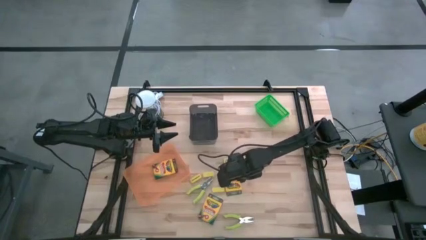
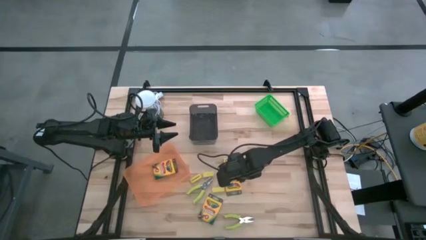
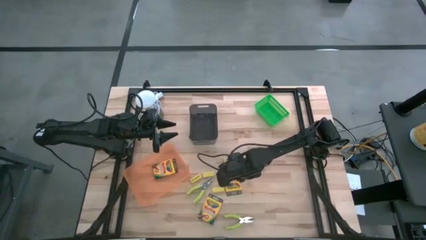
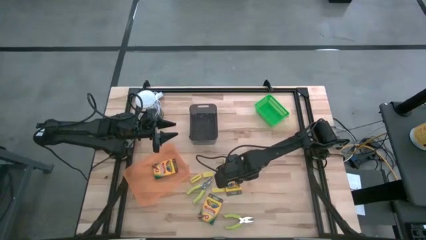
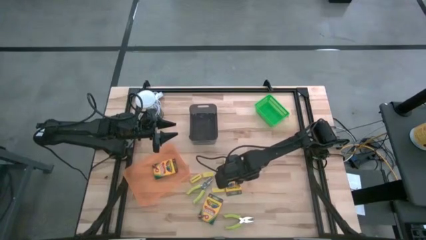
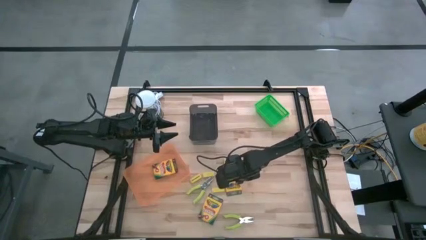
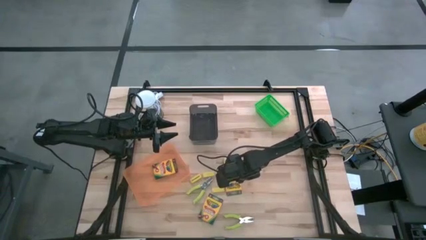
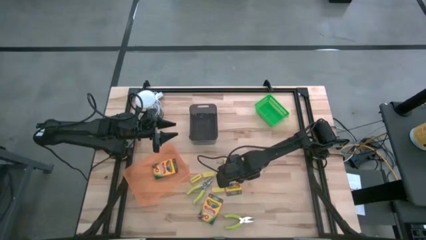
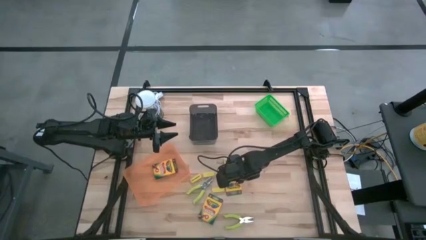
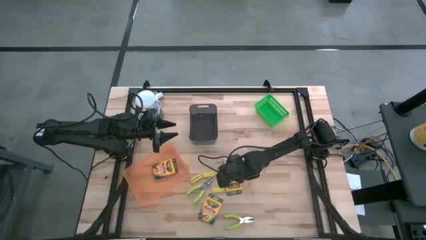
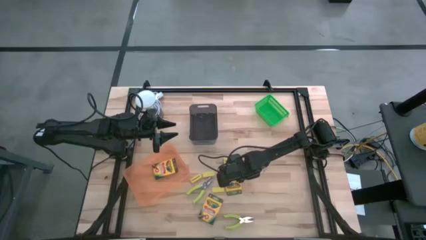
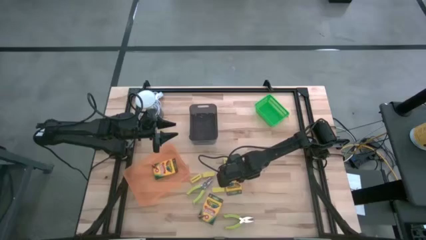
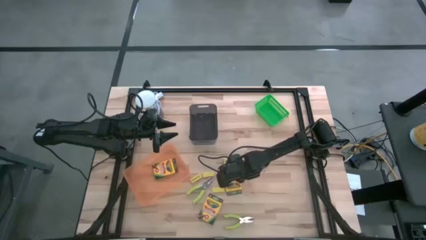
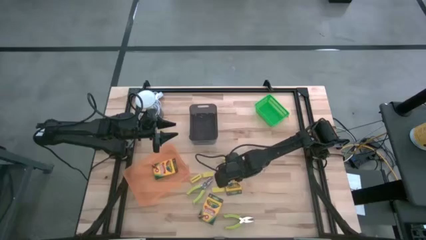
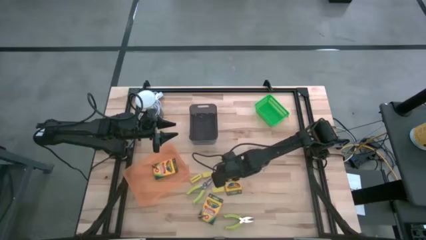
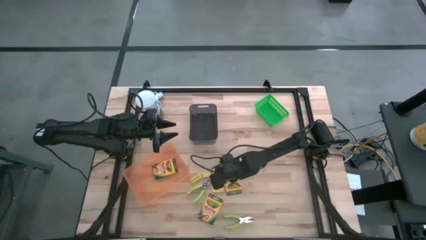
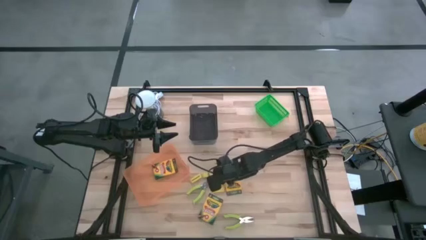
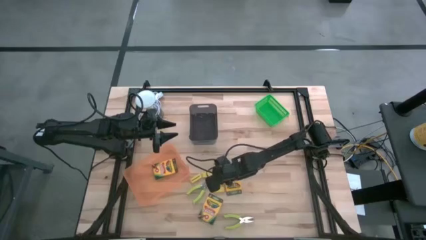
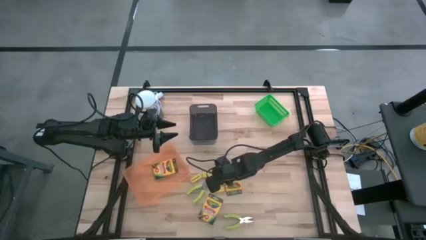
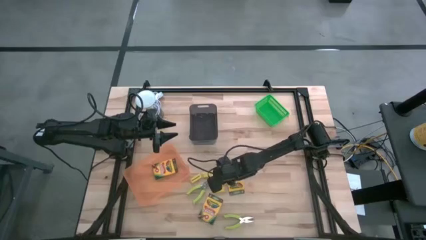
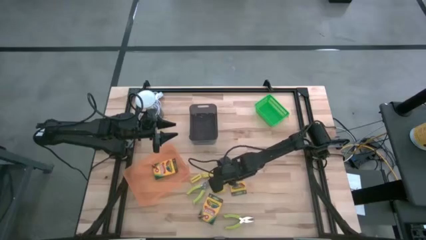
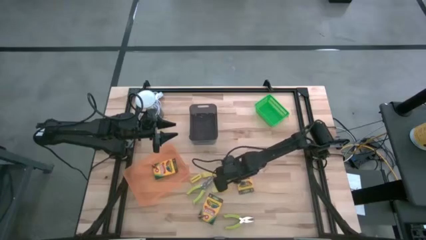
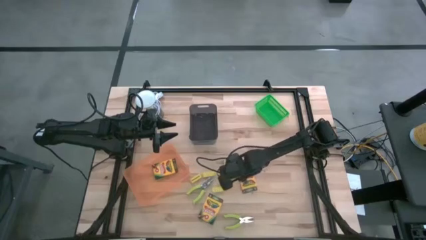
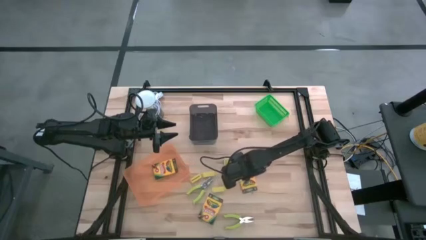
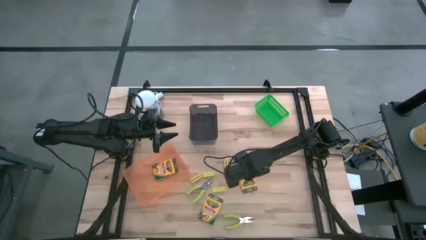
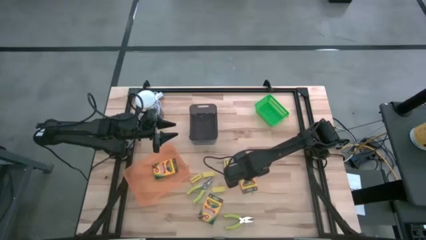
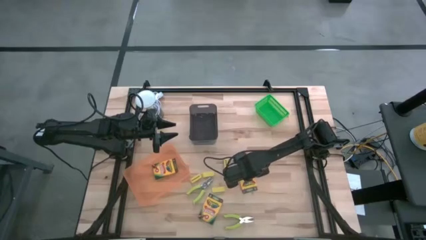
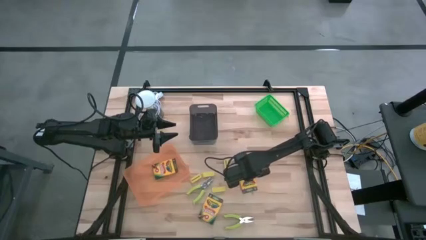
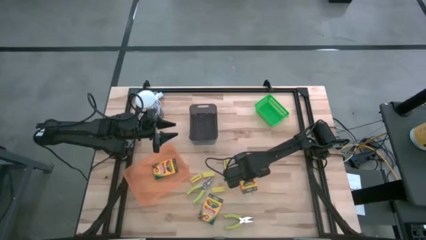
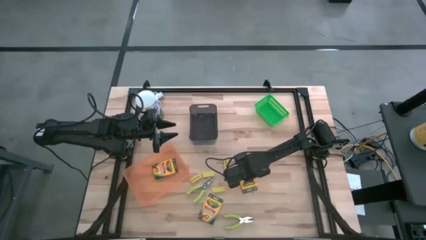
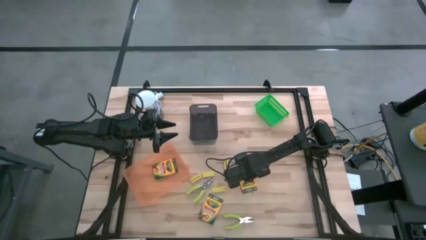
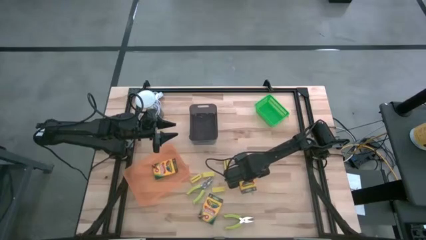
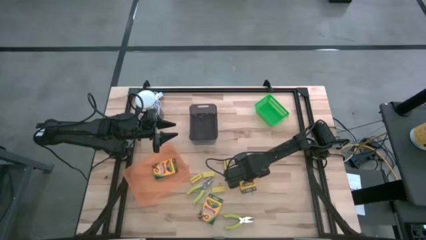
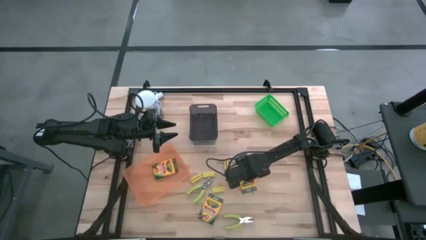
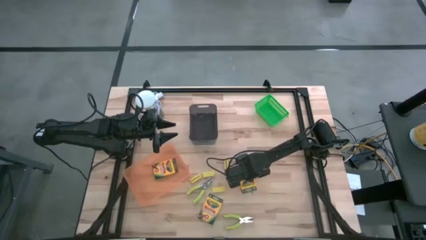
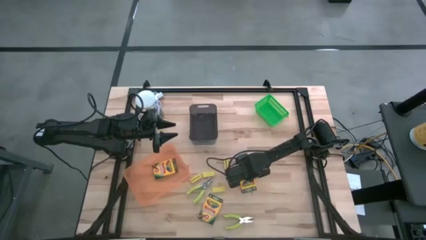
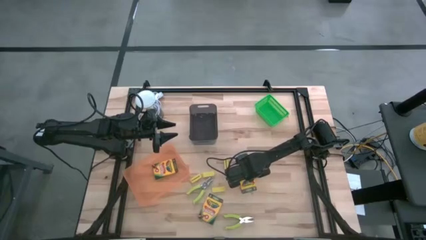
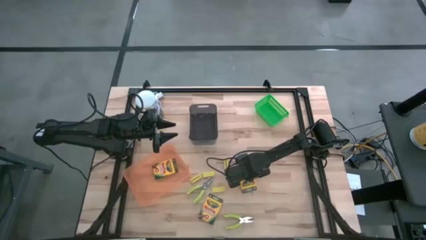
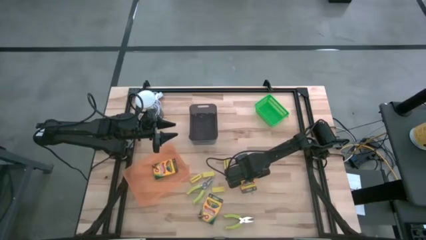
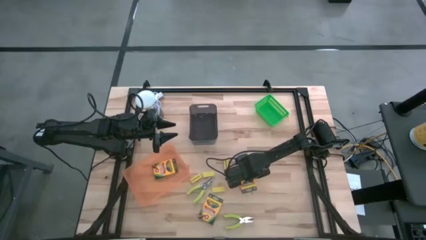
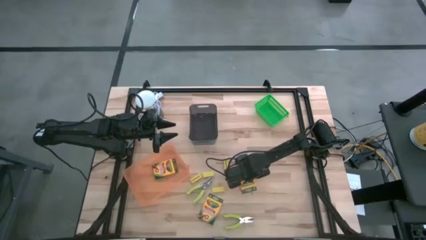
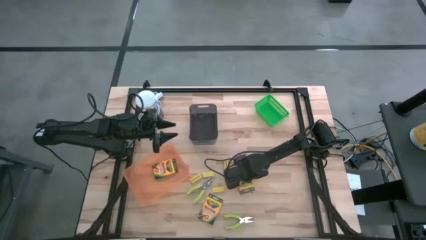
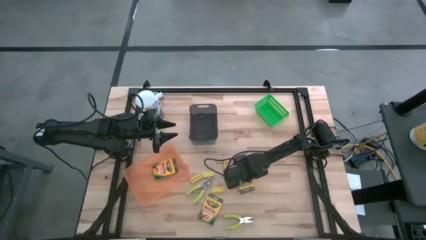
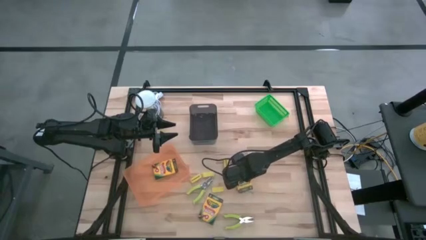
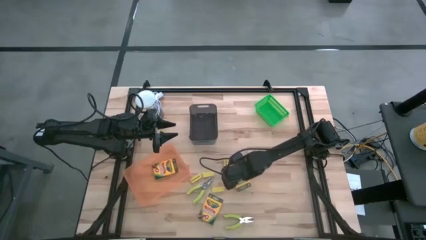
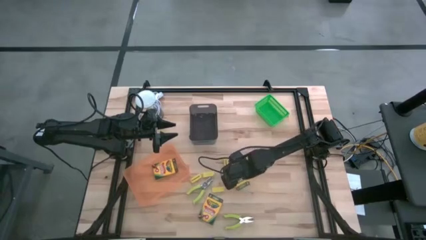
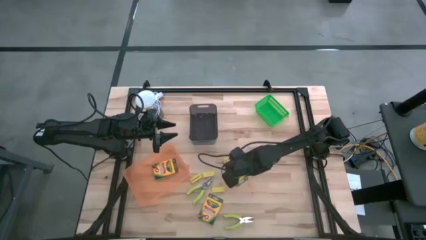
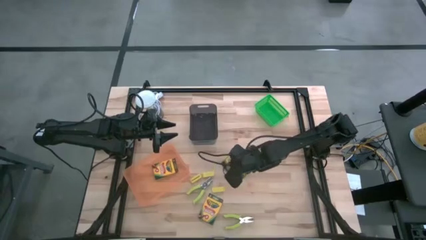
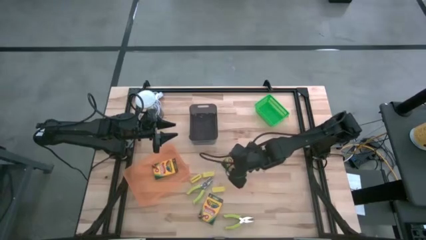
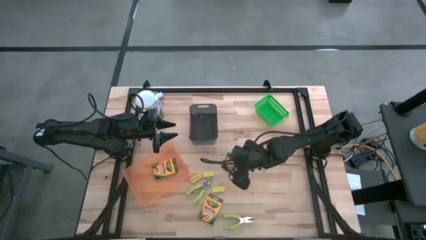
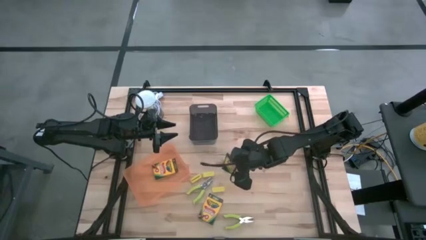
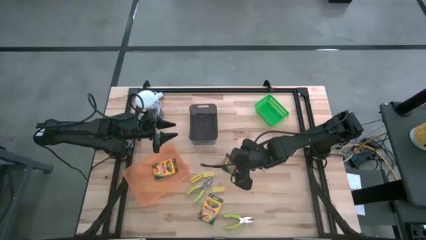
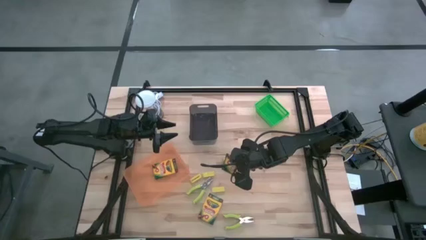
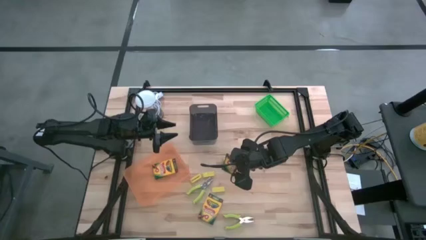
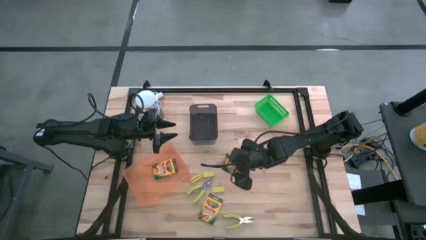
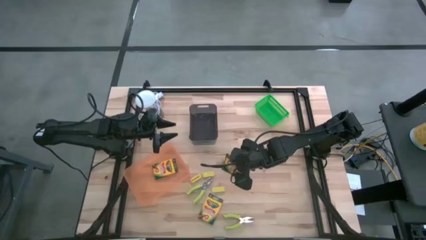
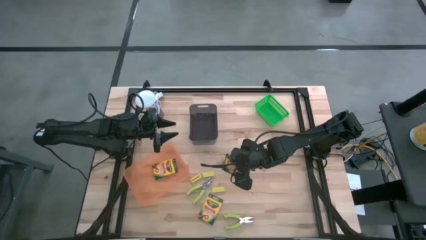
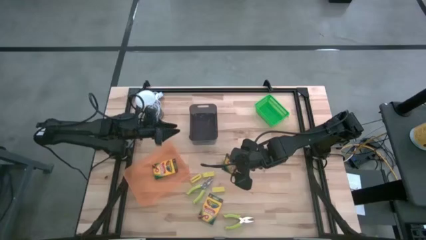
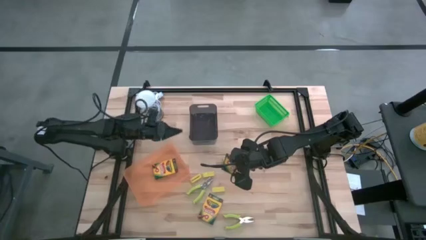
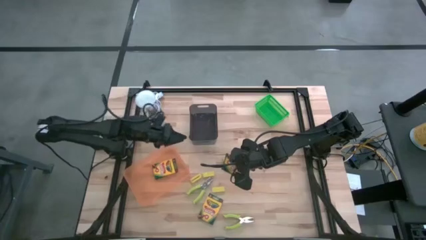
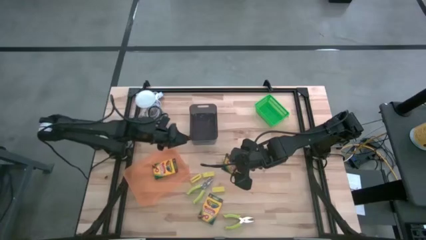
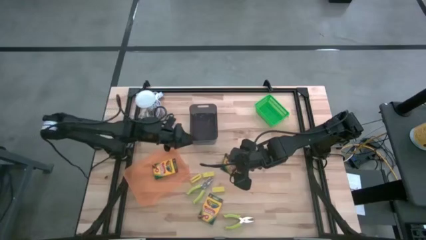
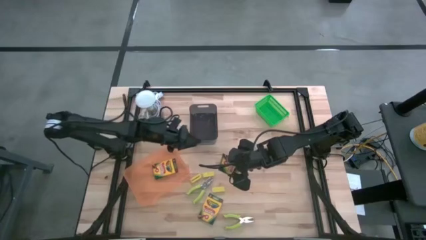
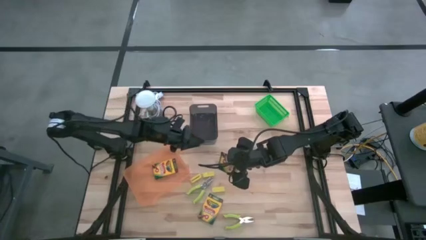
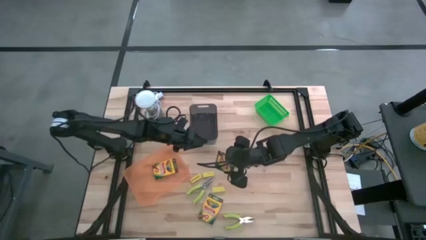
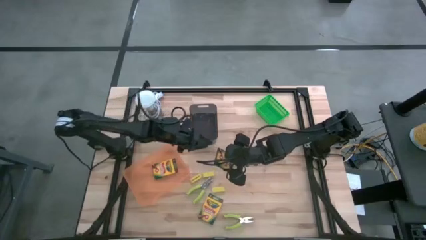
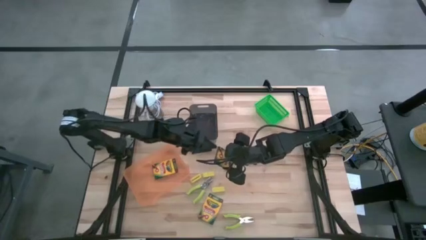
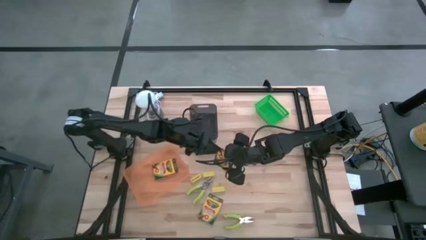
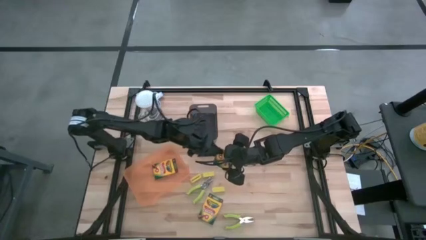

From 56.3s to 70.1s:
Task: Pick & Place School Supplies
Put the pack of crayons into the orange bin
